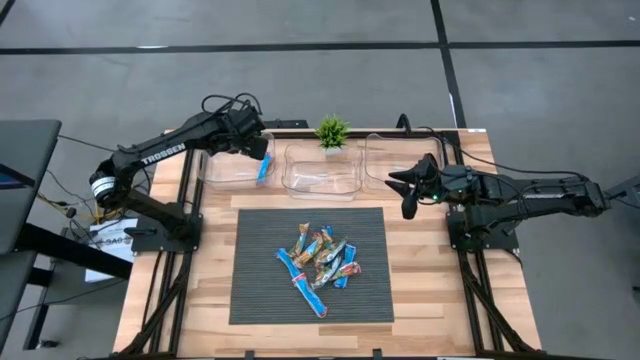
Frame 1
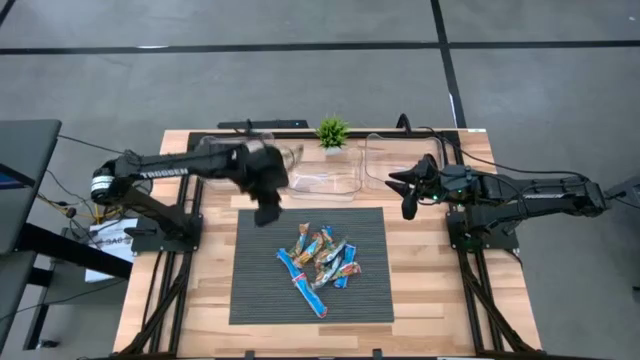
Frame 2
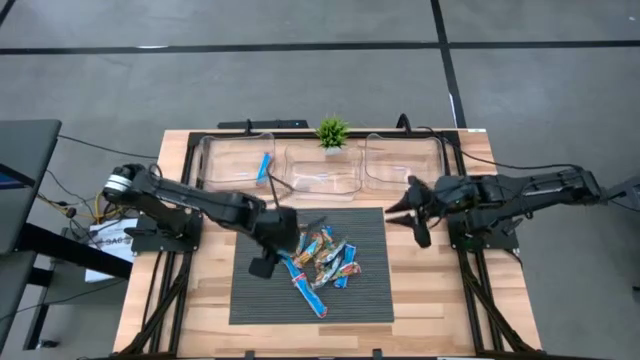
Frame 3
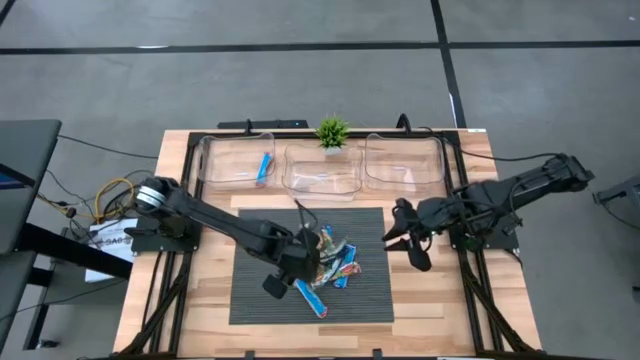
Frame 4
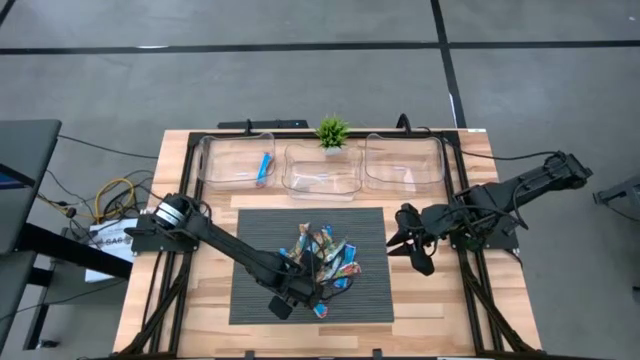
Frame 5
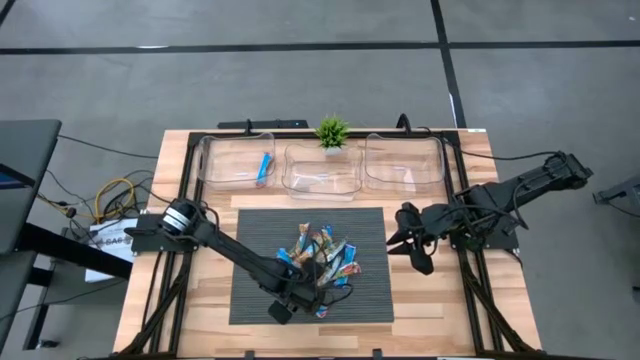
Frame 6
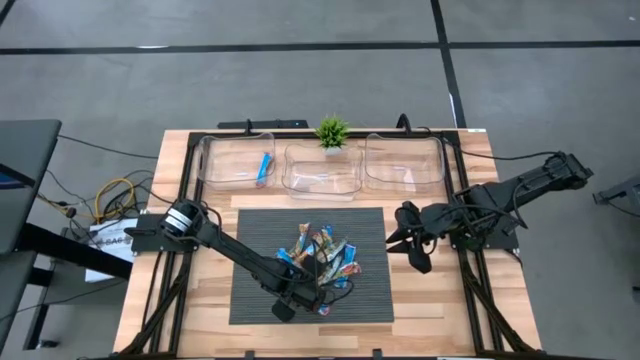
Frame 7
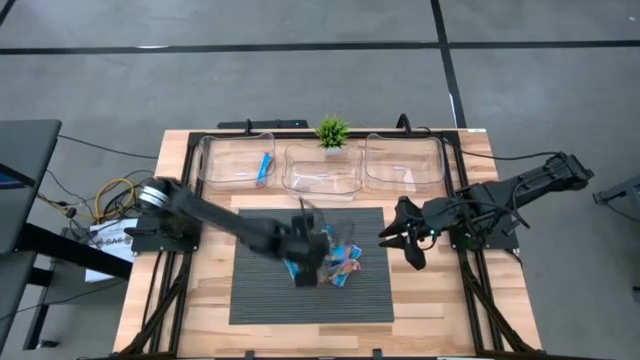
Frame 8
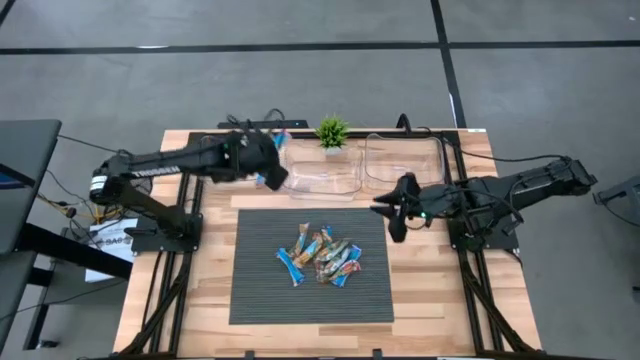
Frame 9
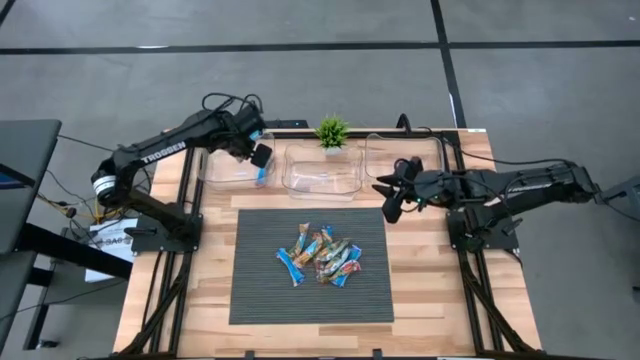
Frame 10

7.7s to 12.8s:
Task: Pick and place Granola Bars by type
Put the red granola bar into the top left transparent bin

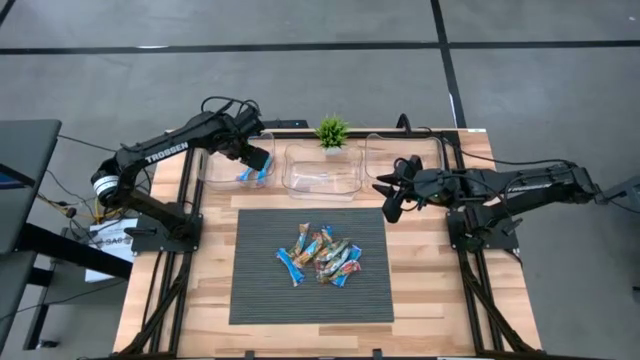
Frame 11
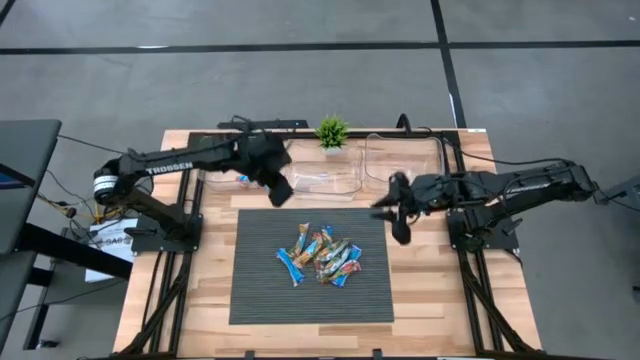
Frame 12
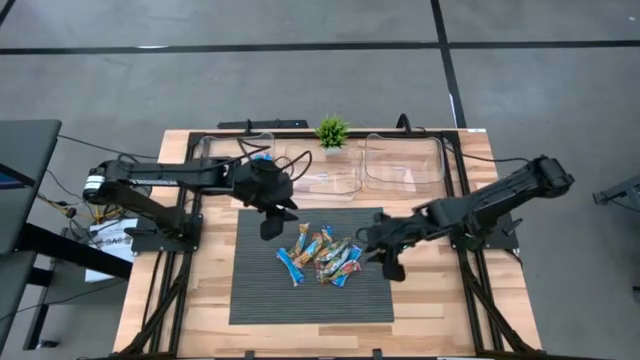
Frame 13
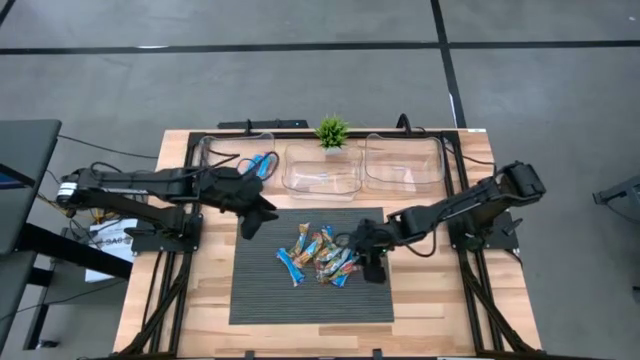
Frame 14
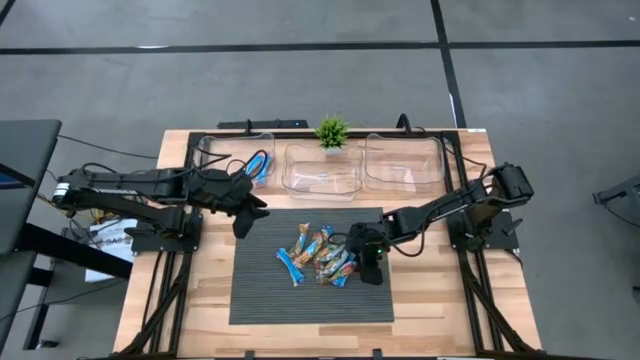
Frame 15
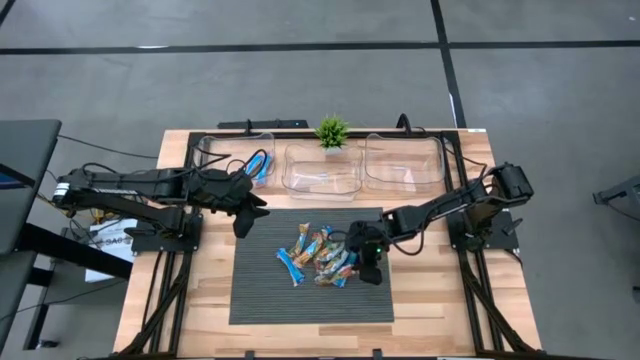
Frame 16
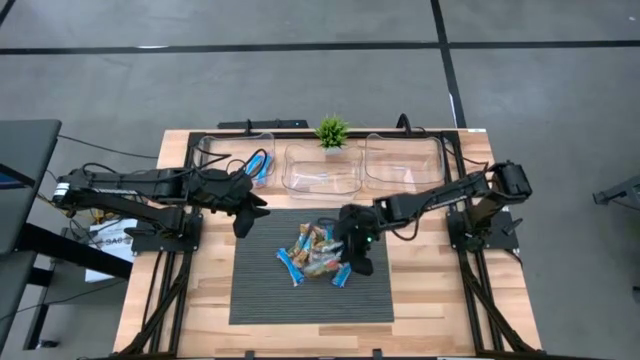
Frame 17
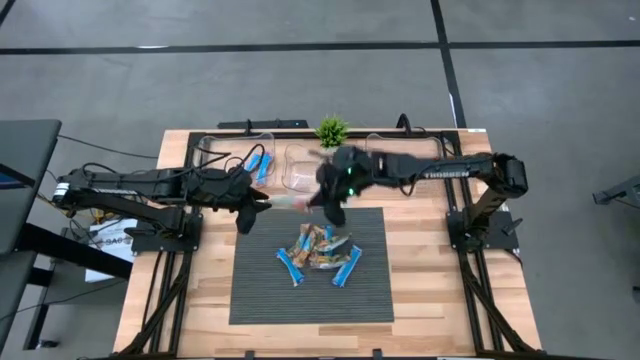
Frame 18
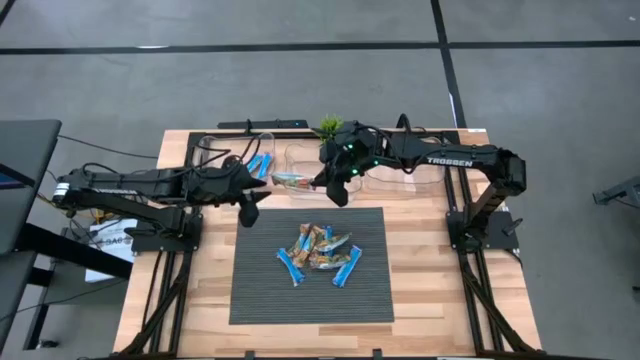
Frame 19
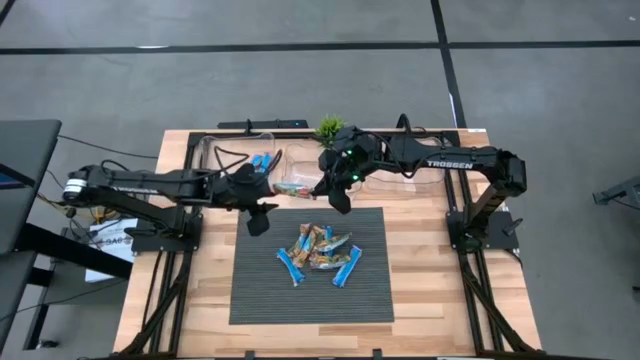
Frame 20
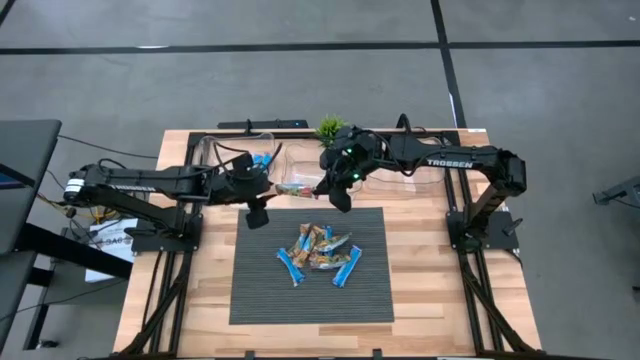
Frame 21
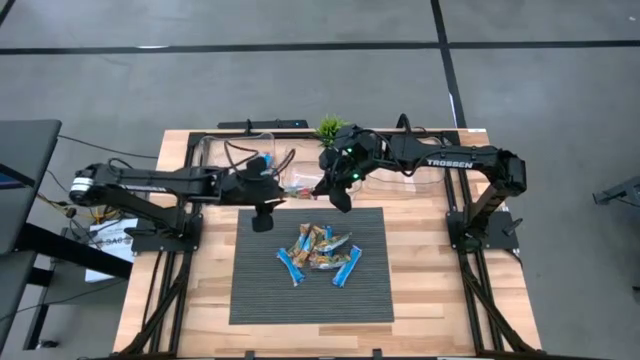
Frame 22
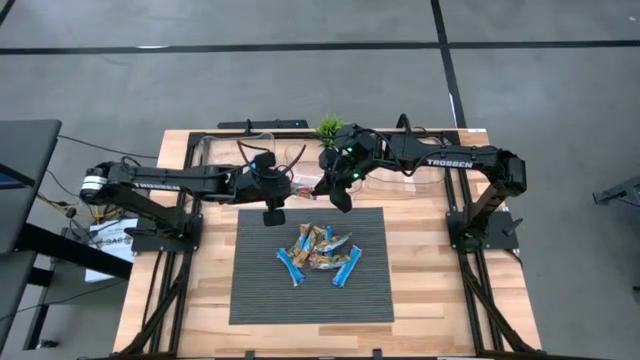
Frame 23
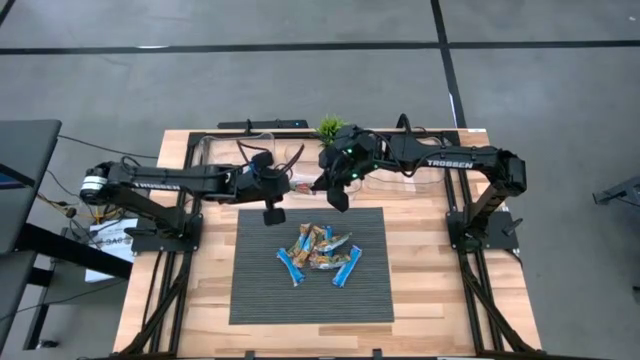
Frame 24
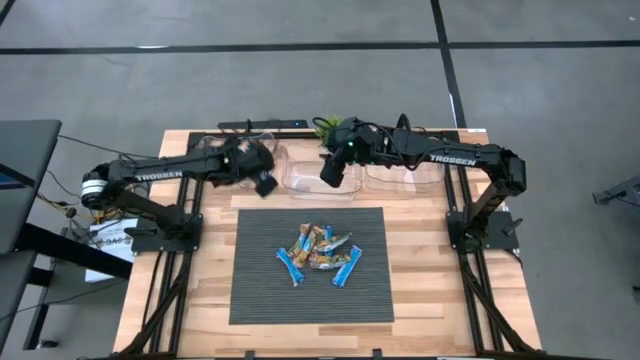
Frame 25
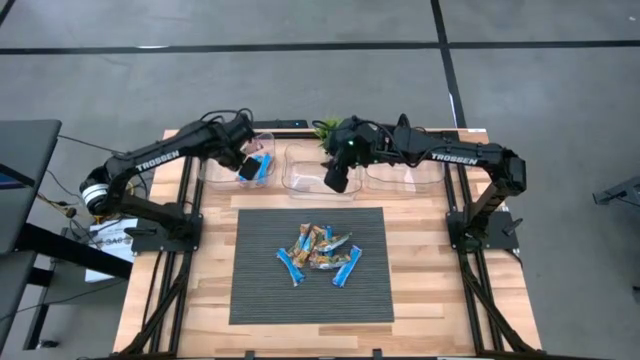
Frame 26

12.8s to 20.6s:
Put the red granola bar into the top left transparent bin

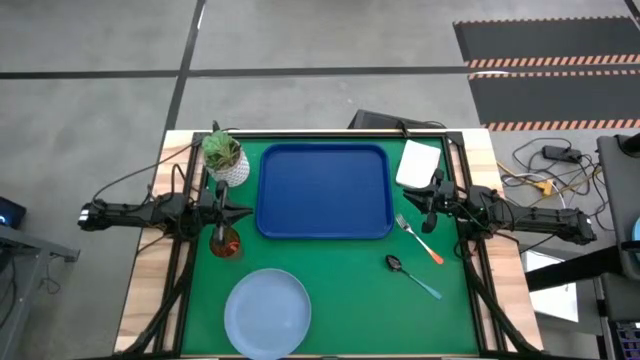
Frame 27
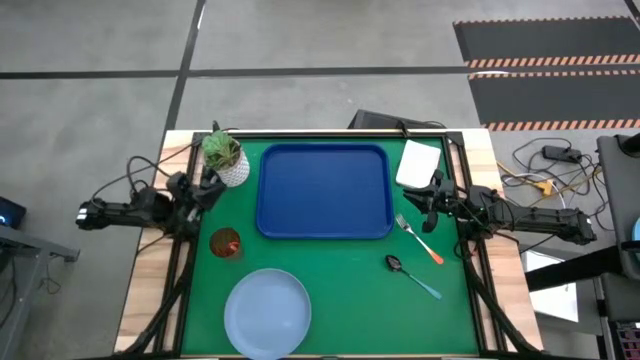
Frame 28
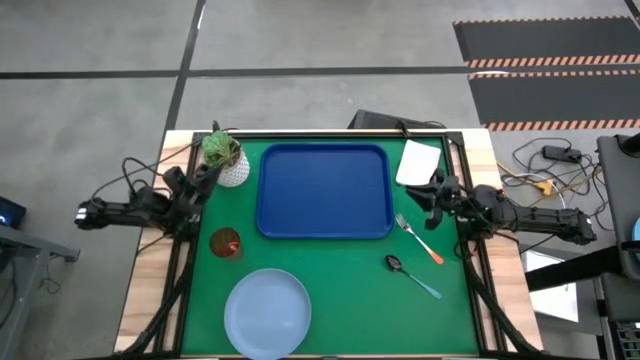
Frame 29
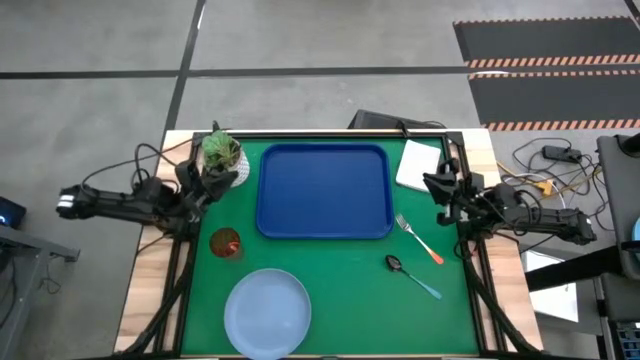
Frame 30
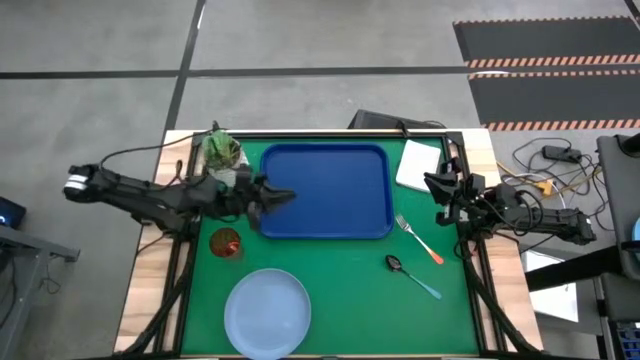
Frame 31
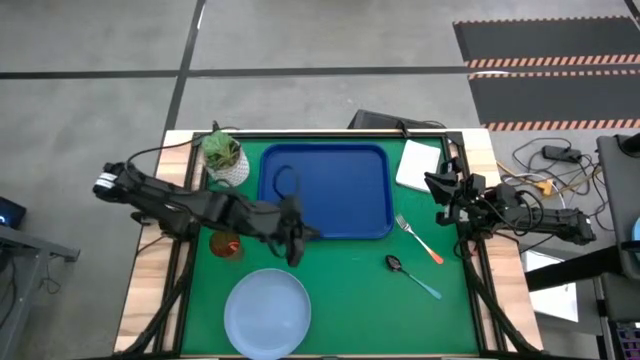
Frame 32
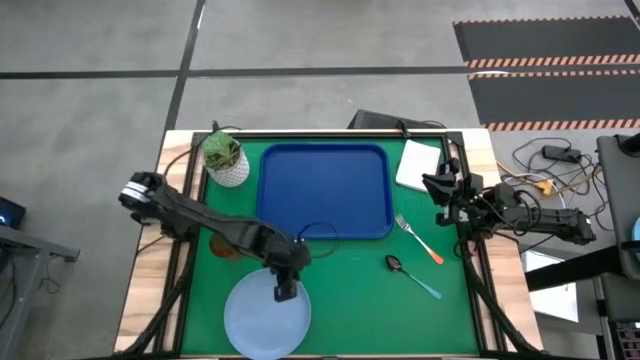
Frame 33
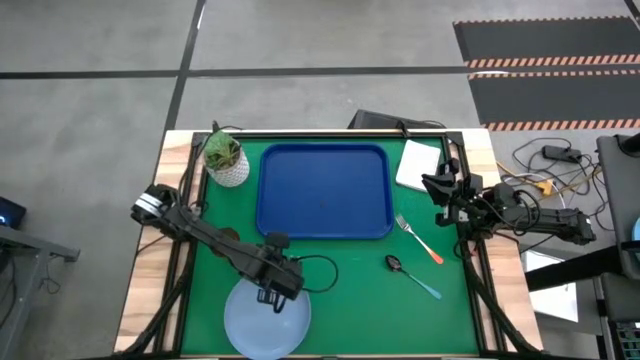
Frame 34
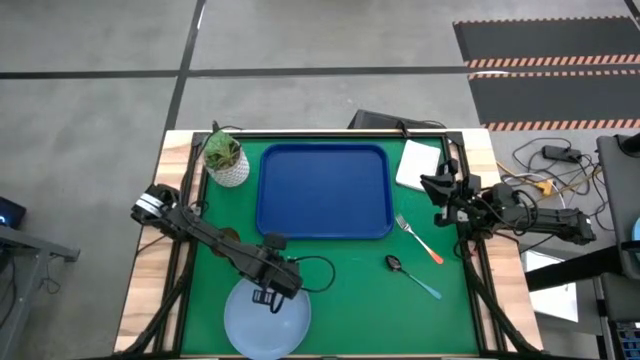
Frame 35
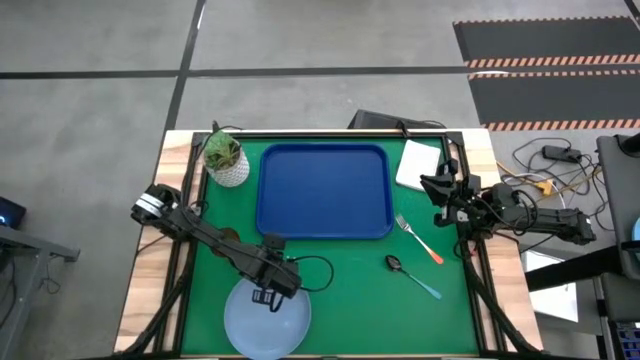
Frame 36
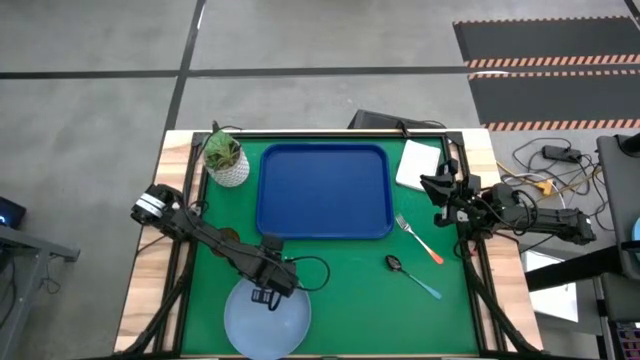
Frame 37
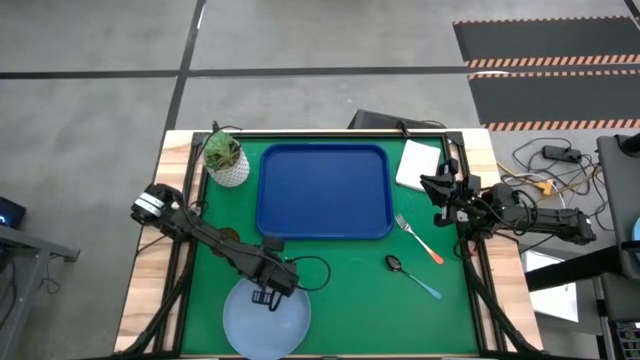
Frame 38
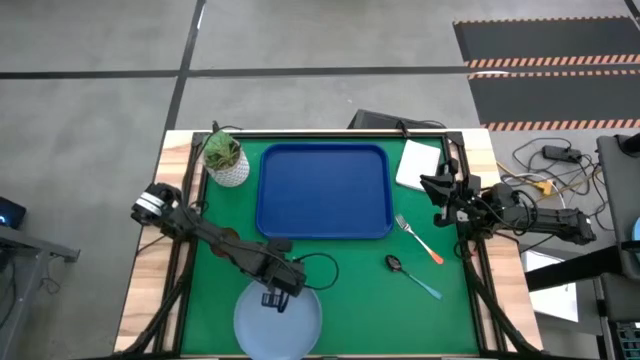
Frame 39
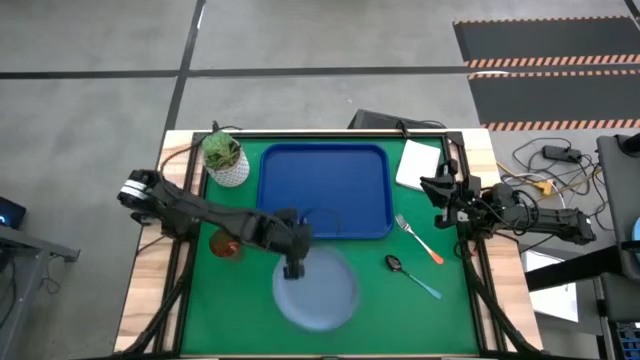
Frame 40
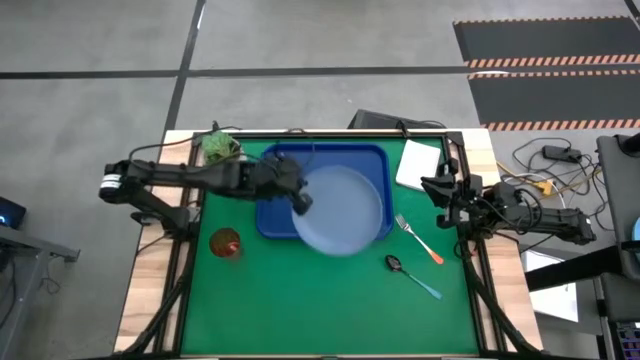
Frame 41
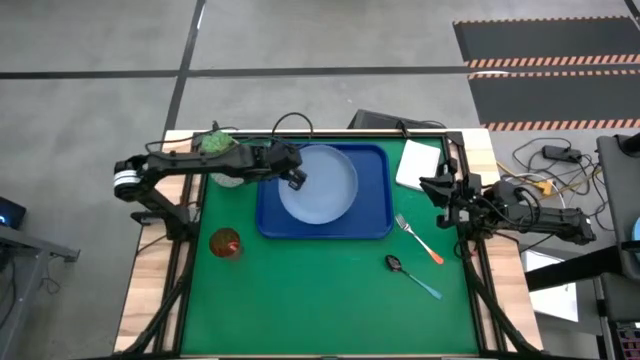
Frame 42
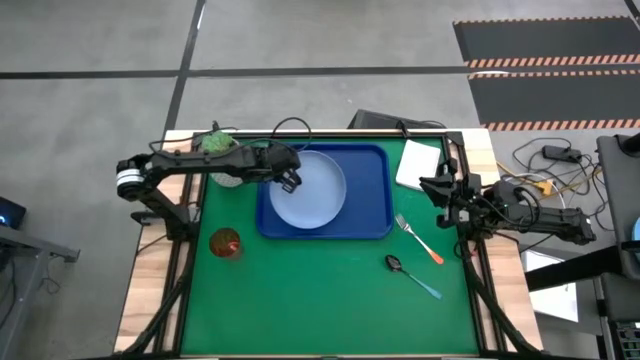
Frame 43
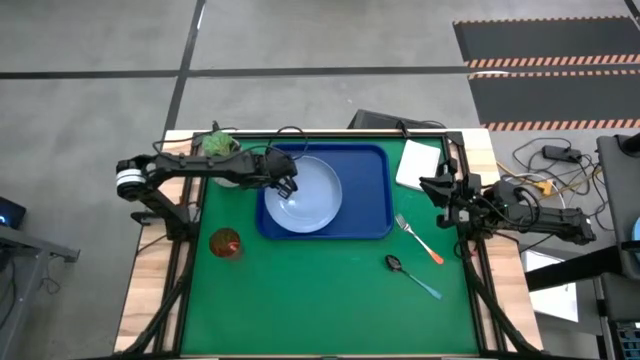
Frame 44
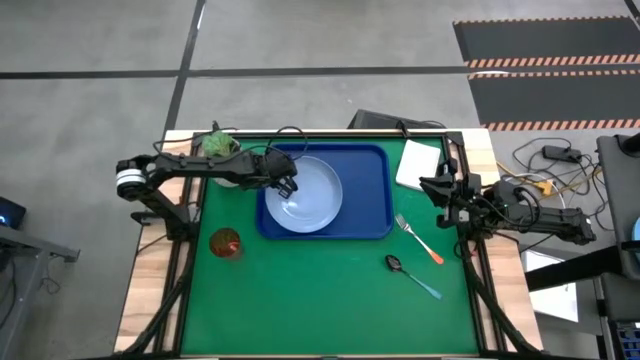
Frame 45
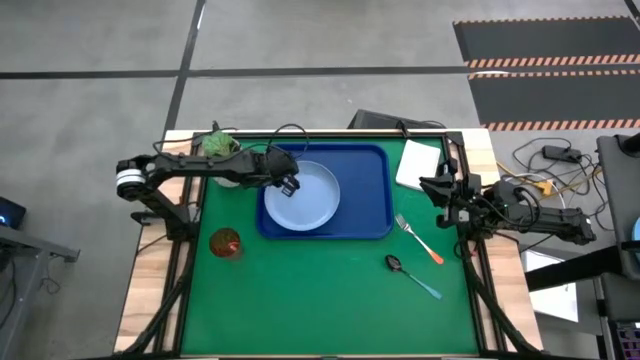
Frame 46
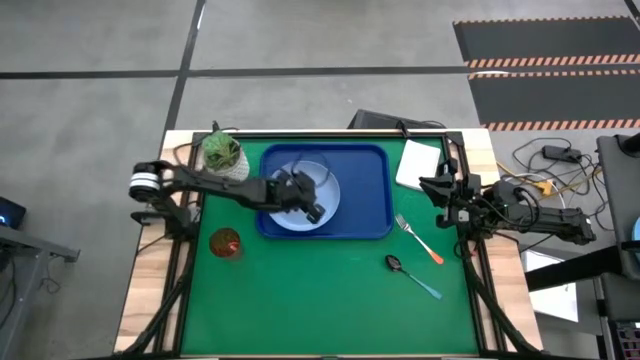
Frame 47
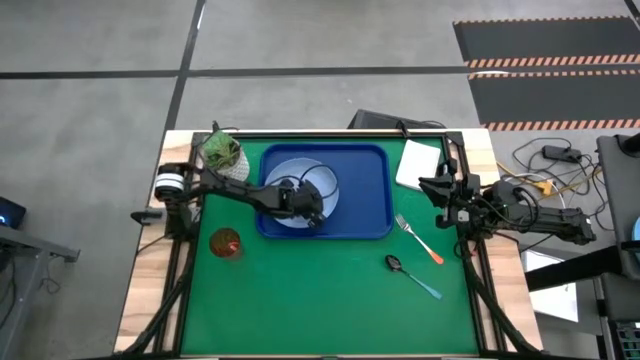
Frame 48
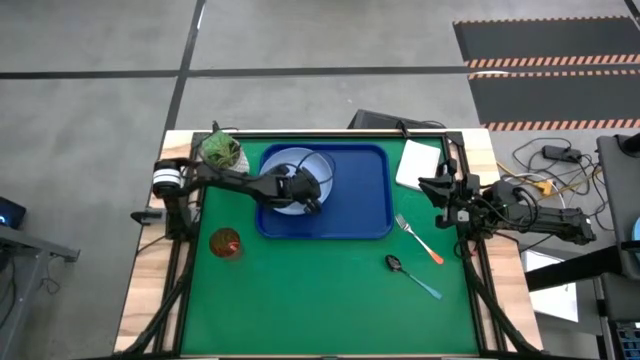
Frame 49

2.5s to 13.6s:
Task: Pick and place plate/cup/fork/spoon on tray
Put the blue plate on the left of the blue tray
